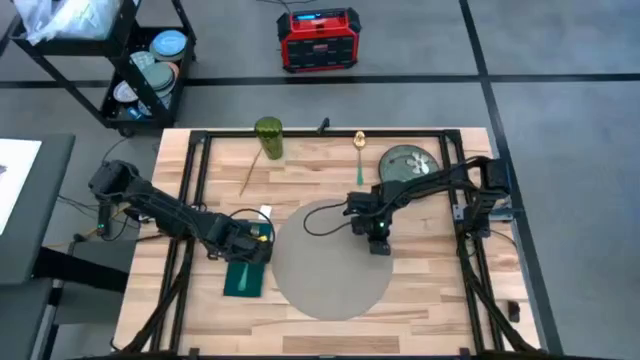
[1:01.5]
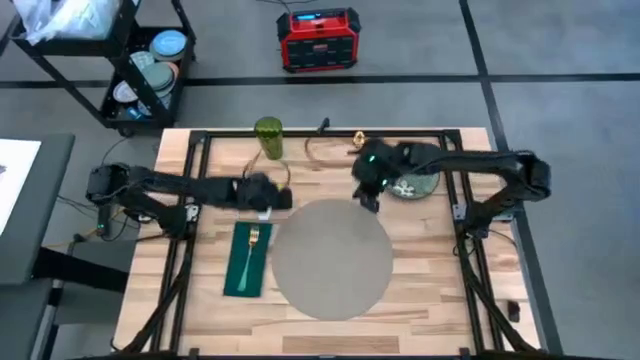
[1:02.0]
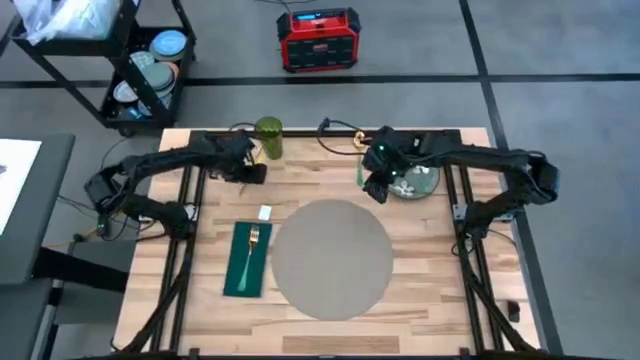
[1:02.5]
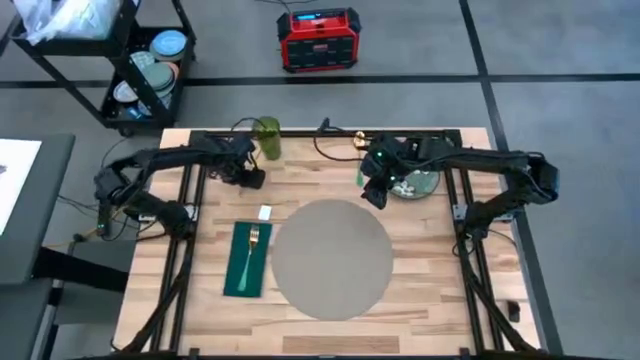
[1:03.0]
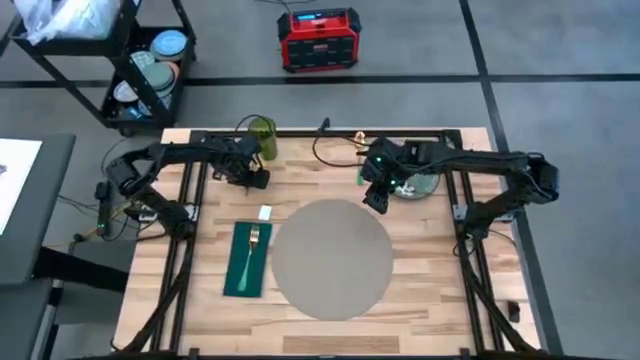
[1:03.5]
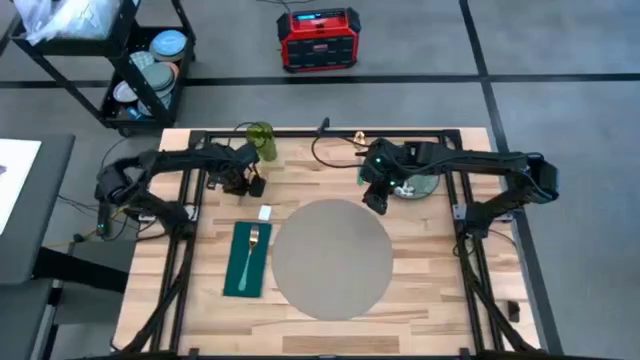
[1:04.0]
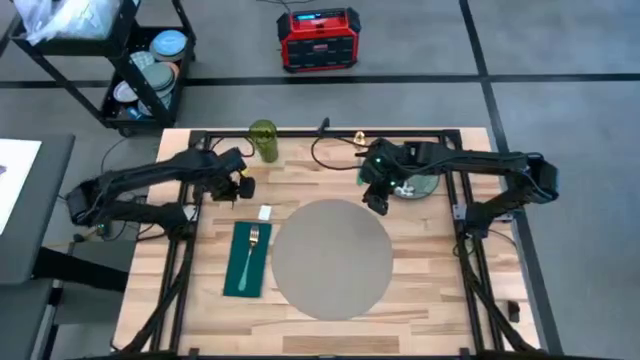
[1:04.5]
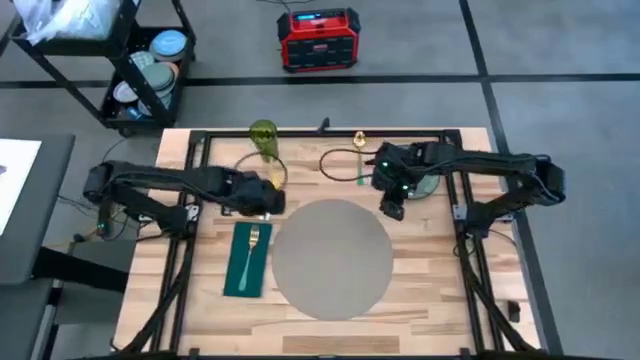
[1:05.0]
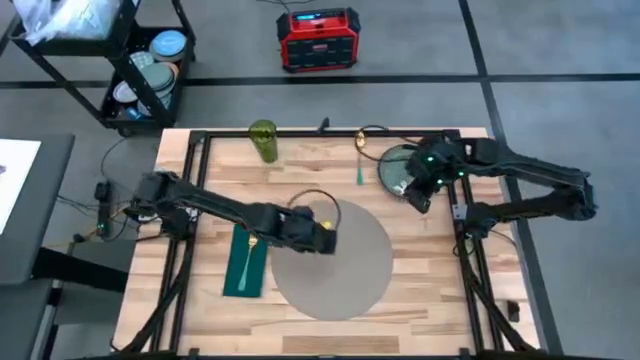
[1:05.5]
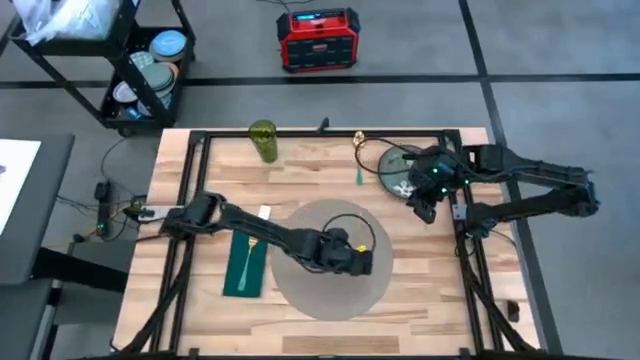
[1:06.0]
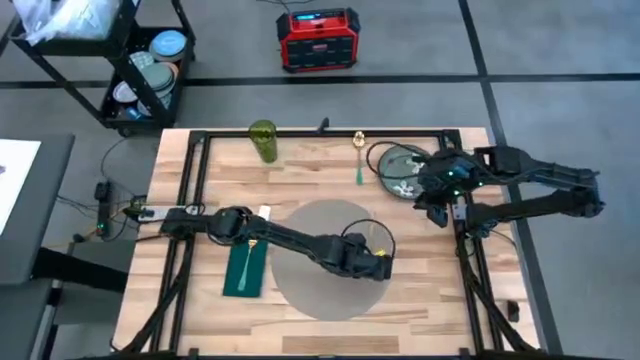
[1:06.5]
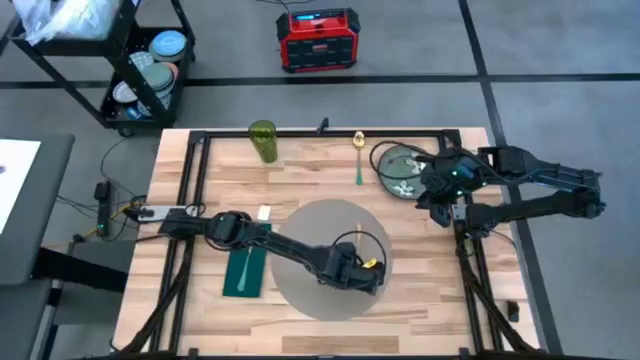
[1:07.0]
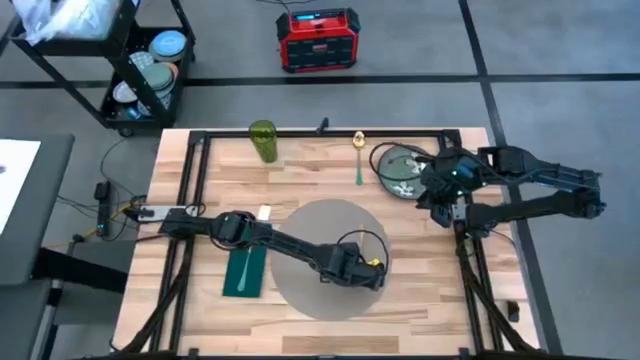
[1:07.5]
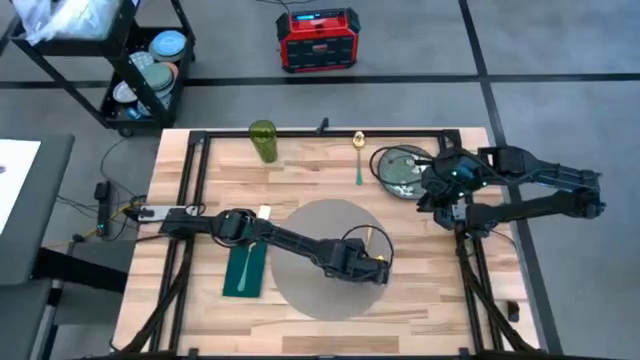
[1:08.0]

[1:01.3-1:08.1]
Task: Set table place
Put the knife on the gray table mat

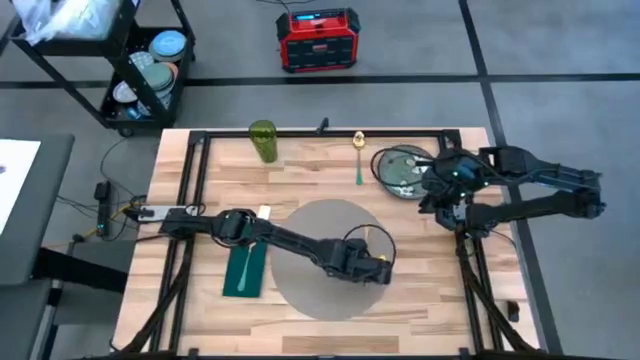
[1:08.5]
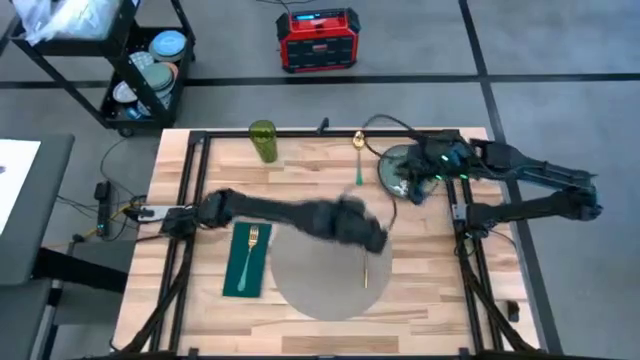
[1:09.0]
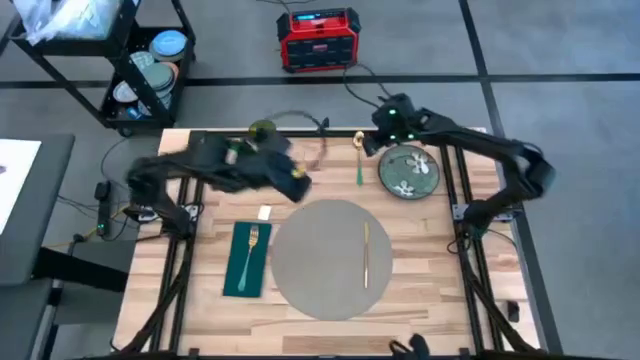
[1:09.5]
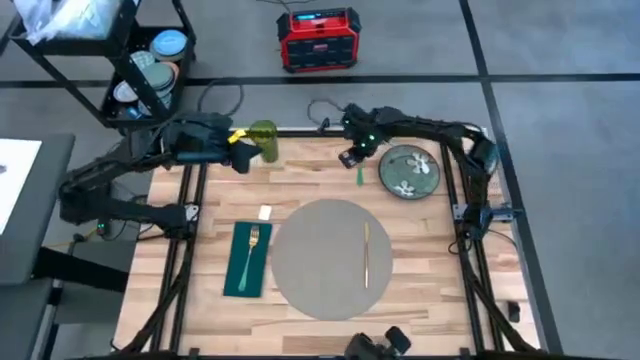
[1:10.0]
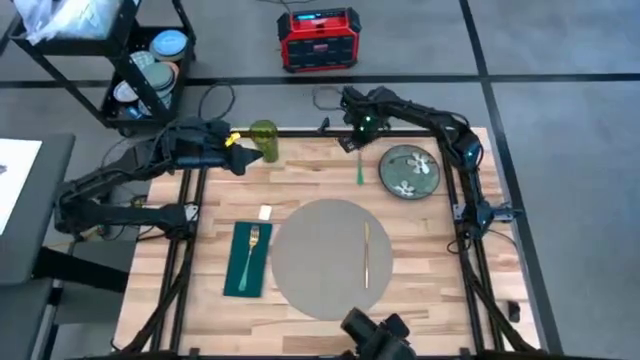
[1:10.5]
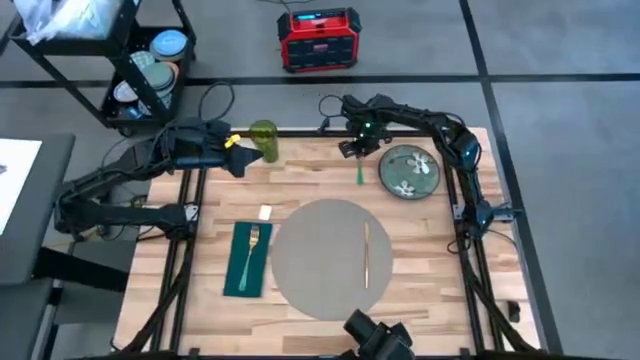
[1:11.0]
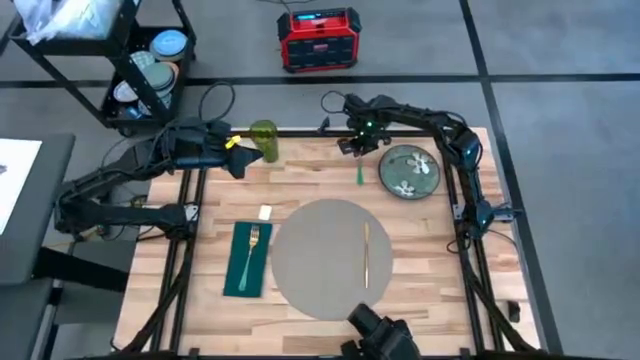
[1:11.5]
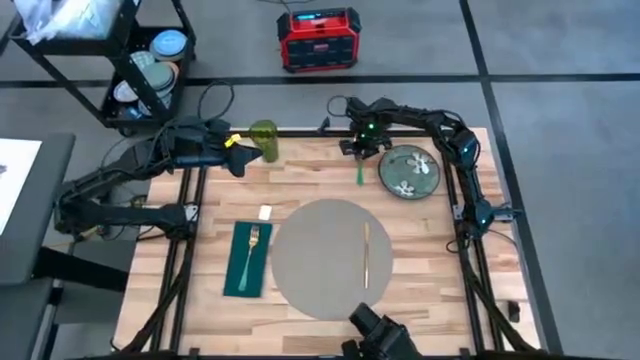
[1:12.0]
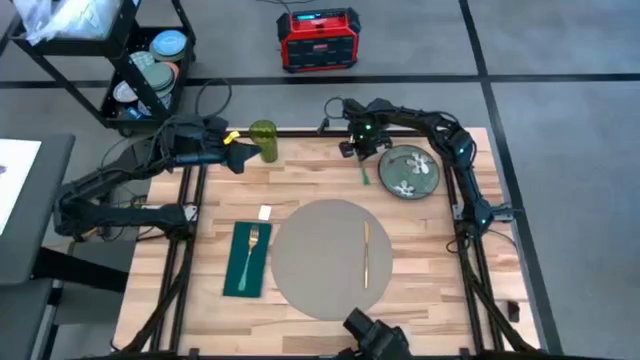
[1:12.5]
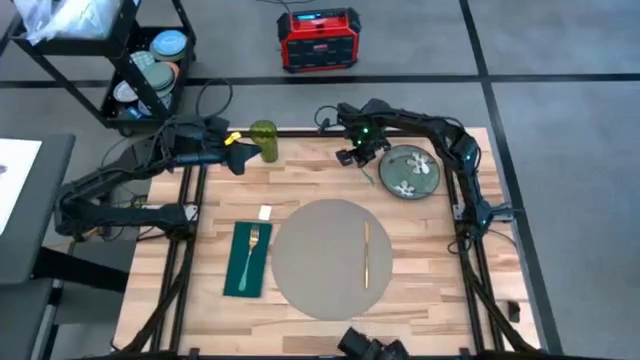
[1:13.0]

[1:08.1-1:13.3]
Put the spoon on the gray table mat

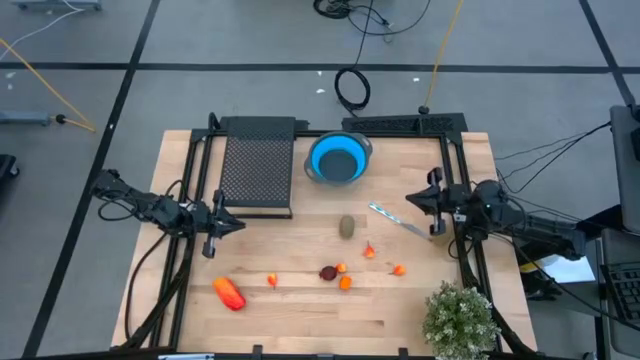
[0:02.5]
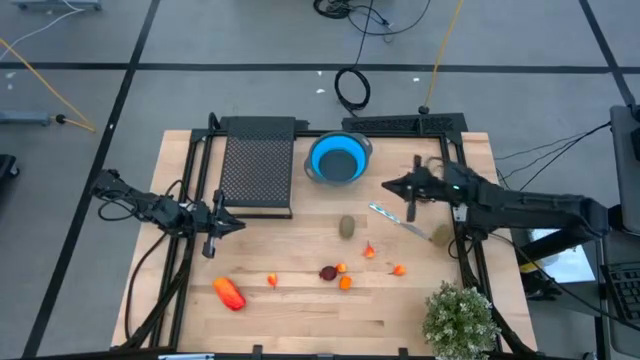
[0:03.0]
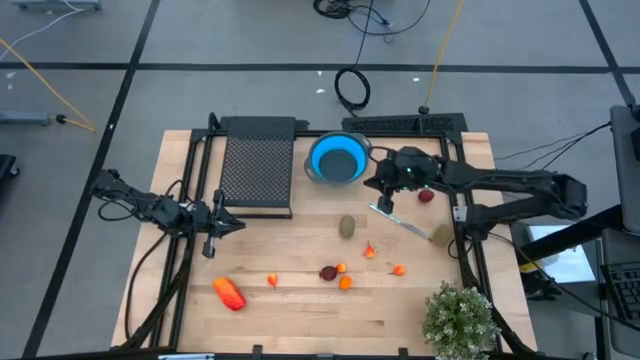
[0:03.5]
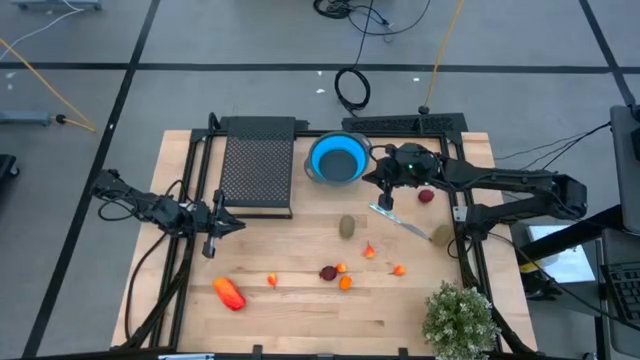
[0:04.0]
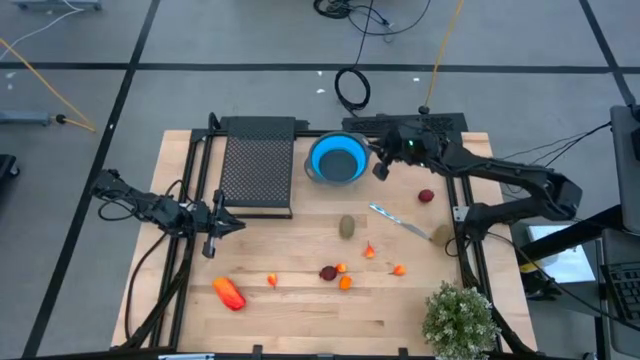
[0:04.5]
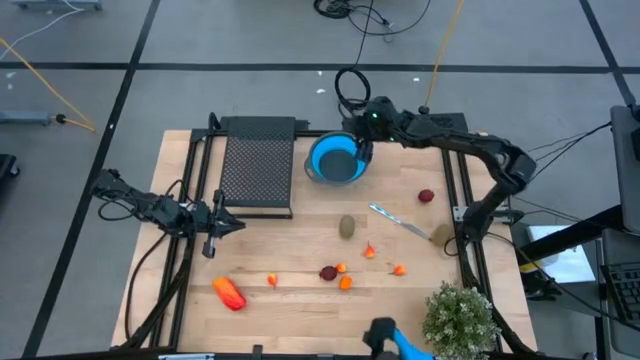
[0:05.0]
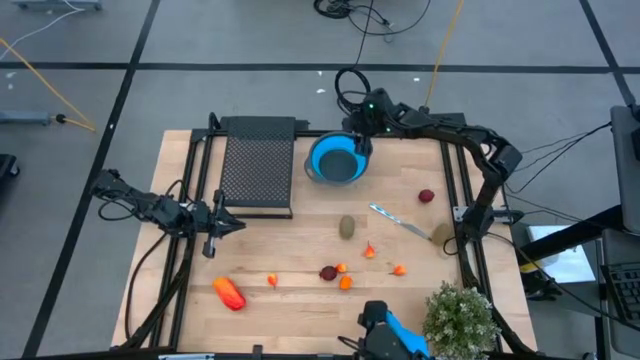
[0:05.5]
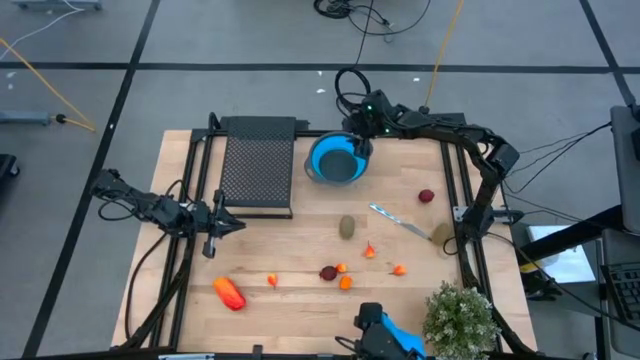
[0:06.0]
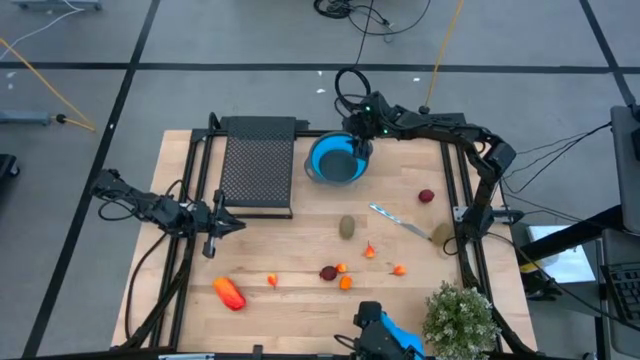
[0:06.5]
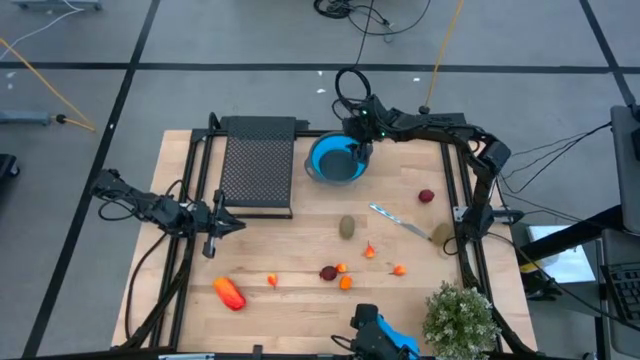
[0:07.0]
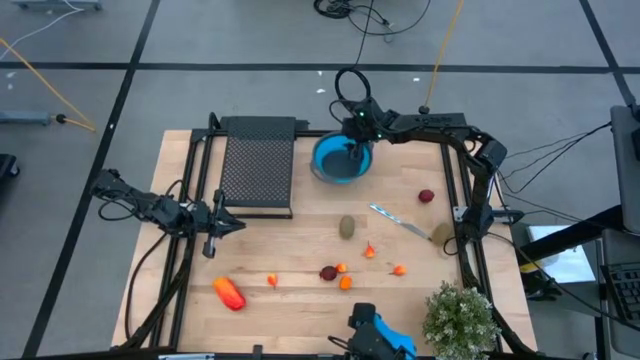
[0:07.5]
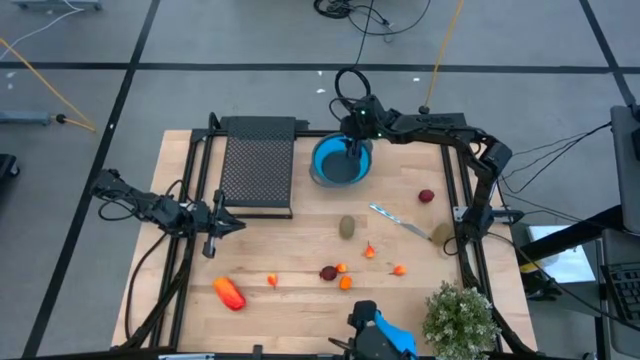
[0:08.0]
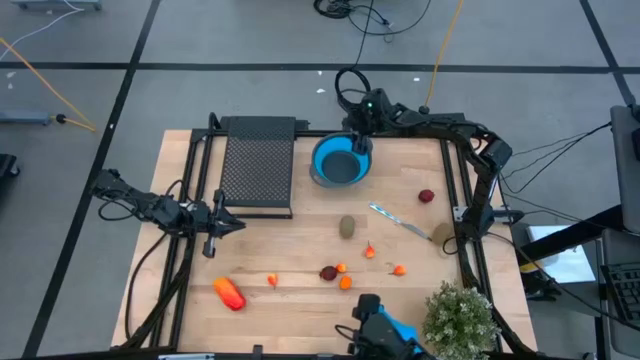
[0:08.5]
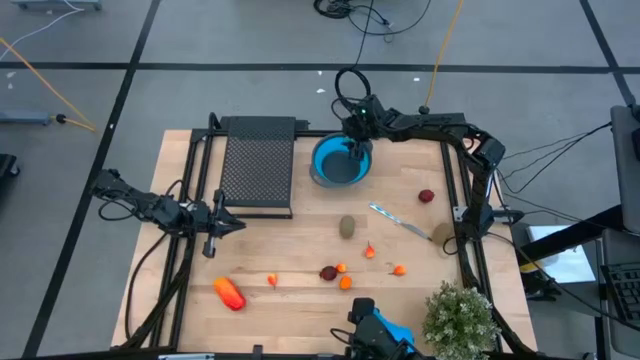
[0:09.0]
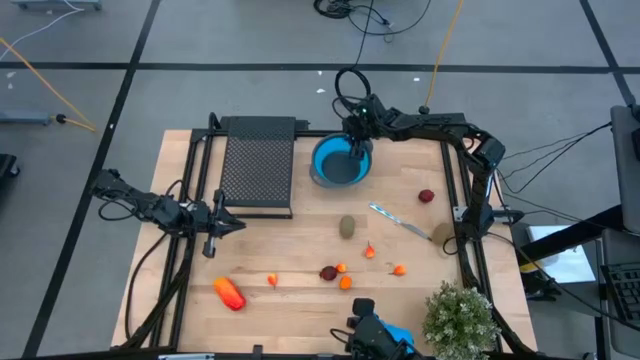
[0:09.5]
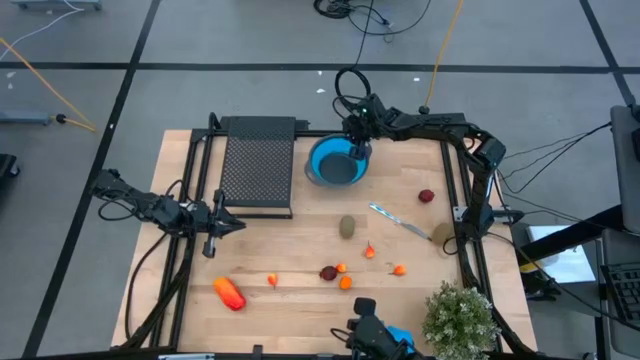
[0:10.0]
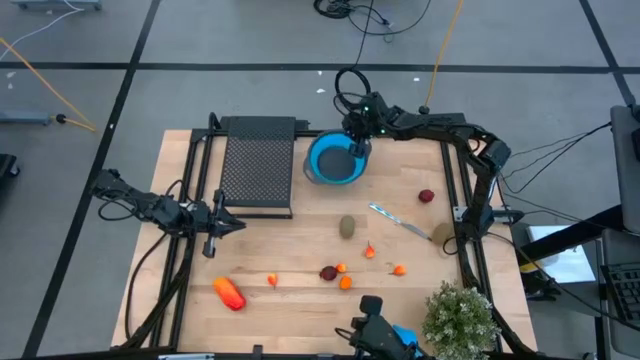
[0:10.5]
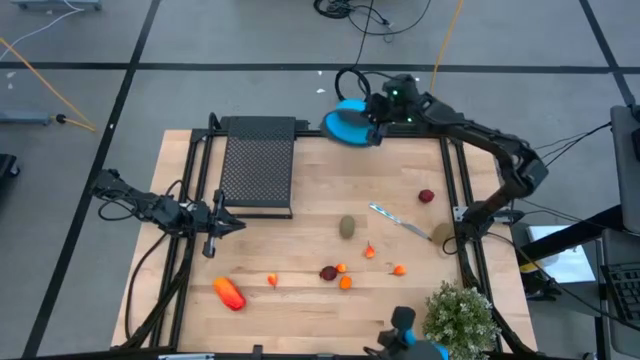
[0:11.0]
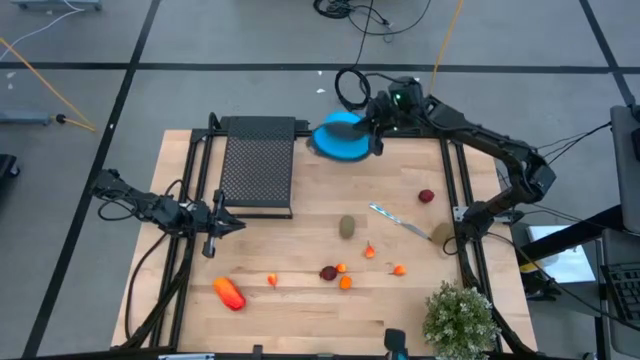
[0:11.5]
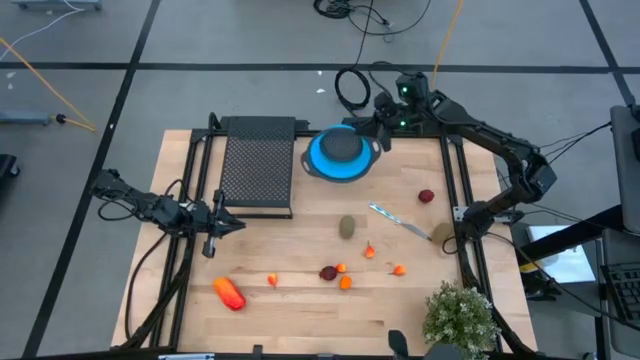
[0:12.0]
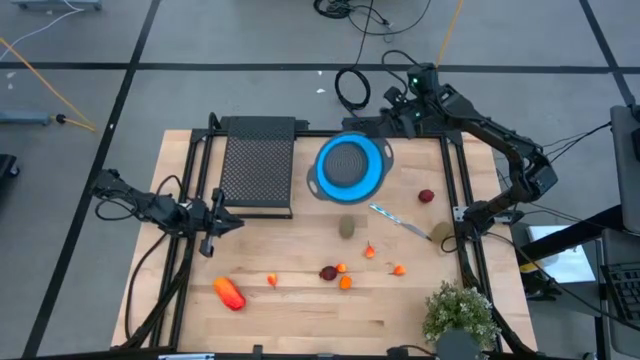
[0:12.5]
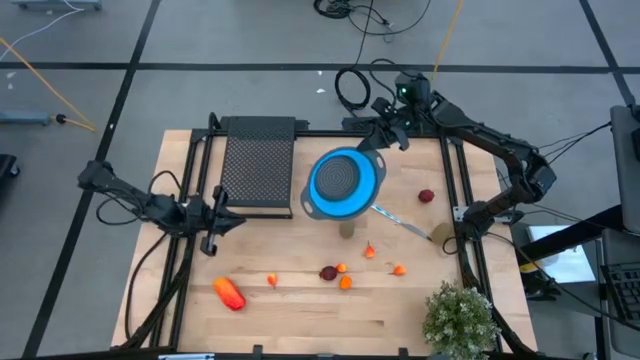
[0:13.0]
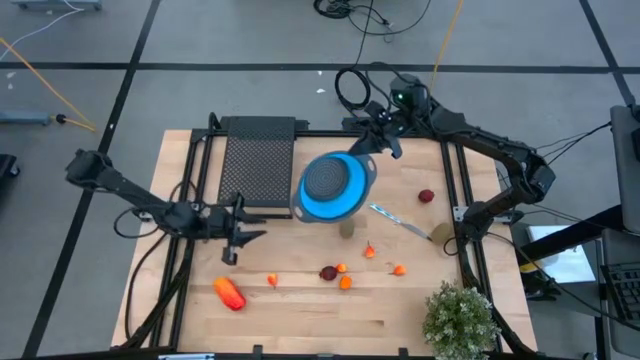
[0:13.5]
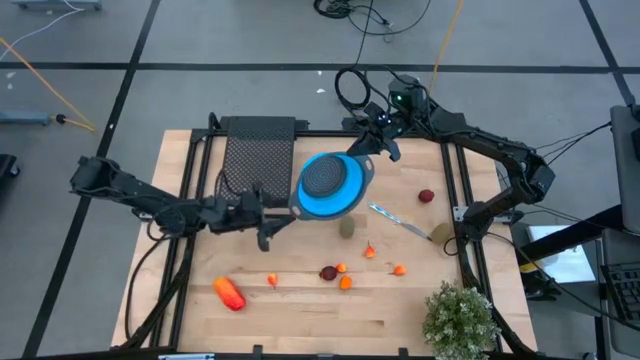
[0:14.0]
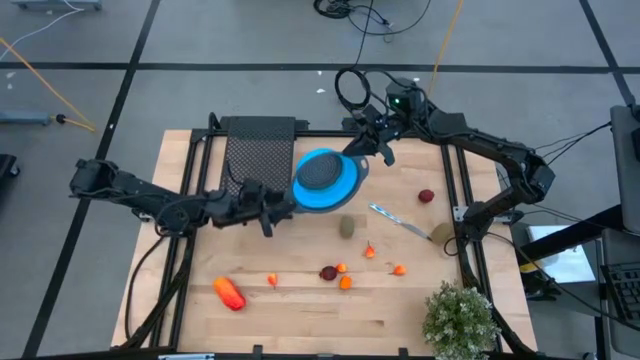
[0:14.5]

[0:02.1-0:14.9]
Task: Pick & Place Fruit
Put the blue strainer bowl on the shelf
